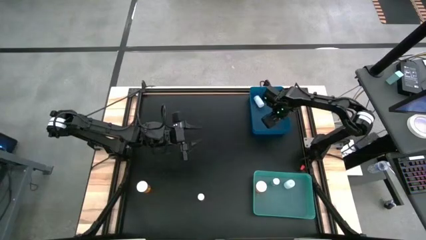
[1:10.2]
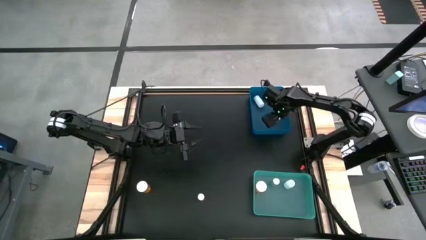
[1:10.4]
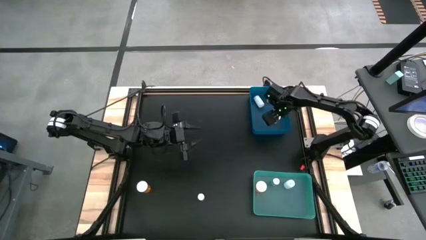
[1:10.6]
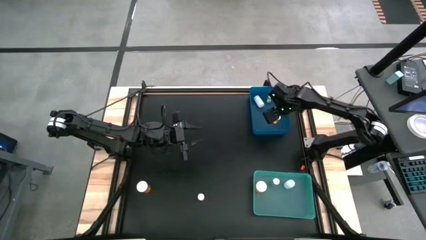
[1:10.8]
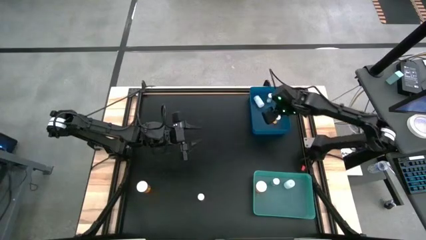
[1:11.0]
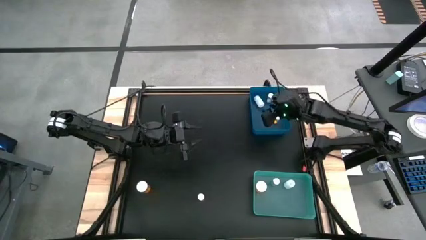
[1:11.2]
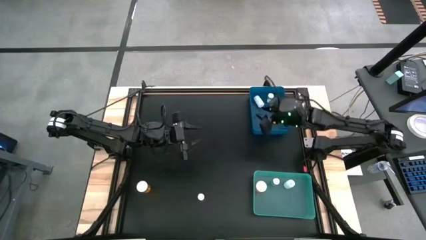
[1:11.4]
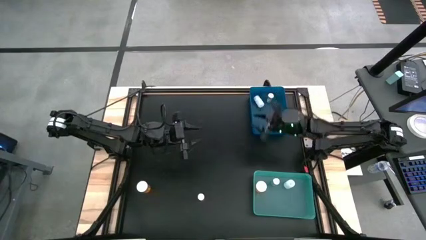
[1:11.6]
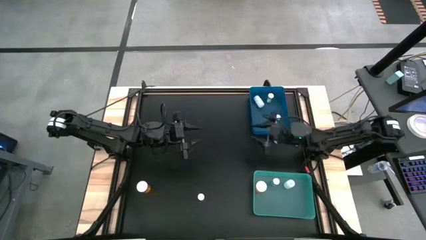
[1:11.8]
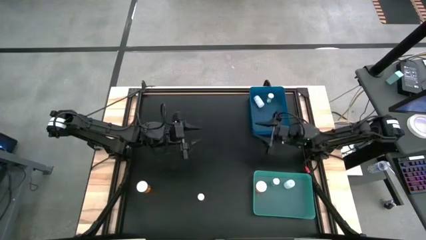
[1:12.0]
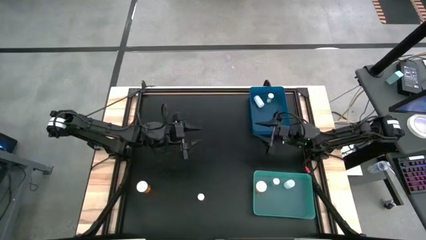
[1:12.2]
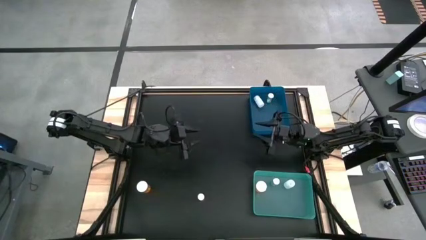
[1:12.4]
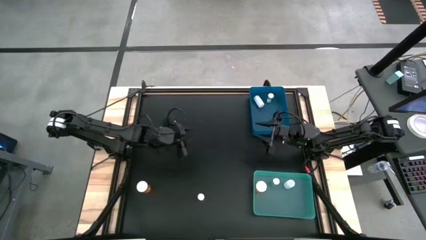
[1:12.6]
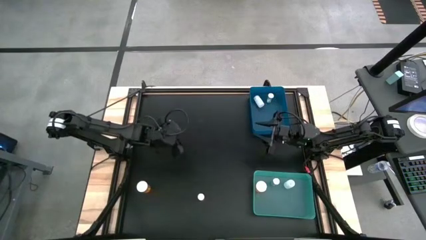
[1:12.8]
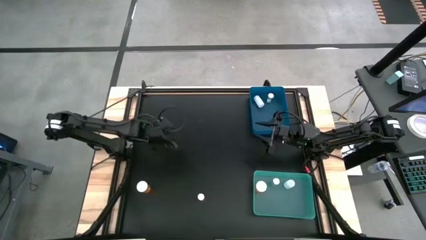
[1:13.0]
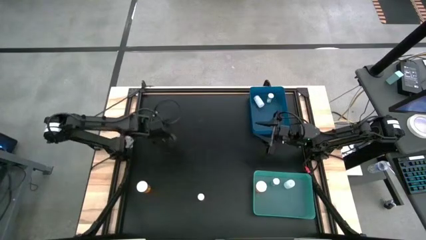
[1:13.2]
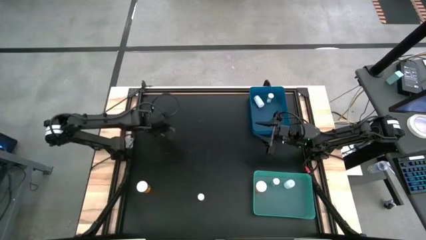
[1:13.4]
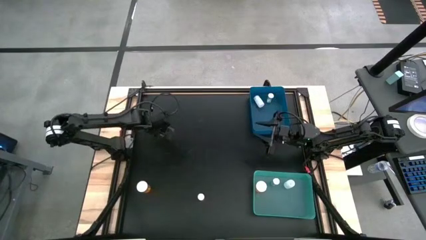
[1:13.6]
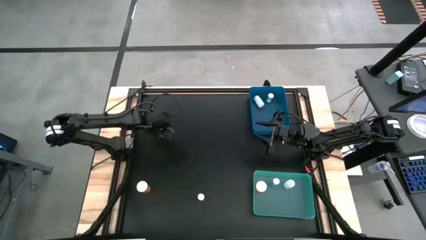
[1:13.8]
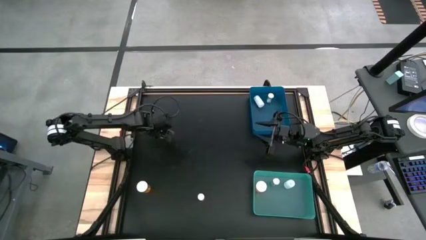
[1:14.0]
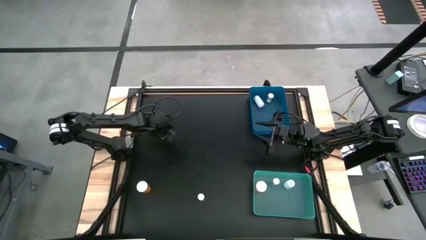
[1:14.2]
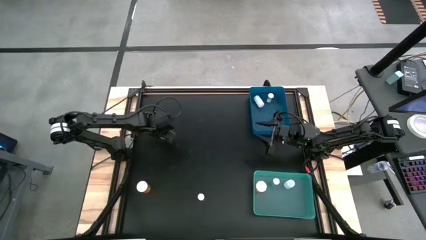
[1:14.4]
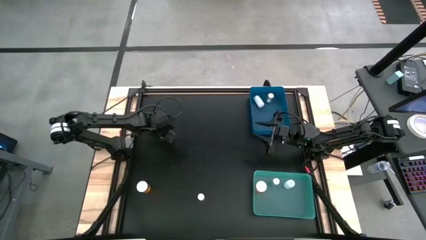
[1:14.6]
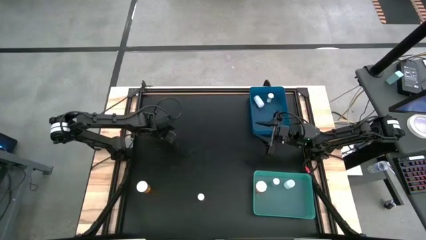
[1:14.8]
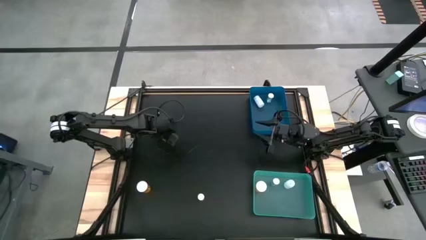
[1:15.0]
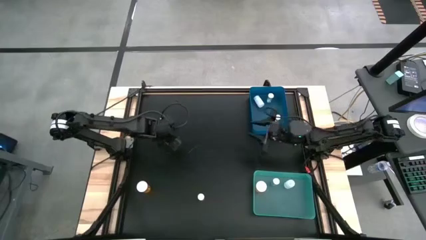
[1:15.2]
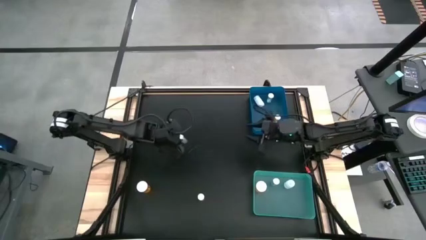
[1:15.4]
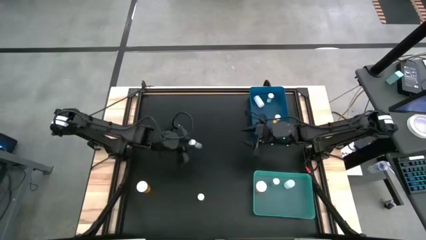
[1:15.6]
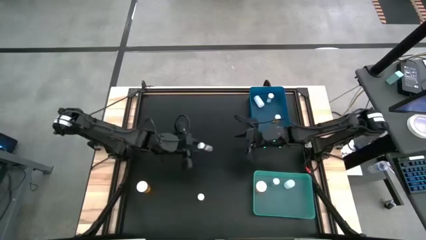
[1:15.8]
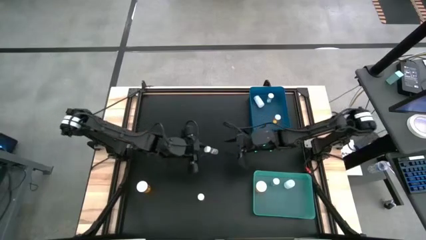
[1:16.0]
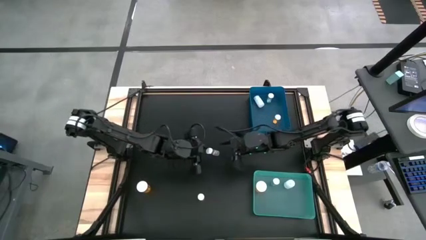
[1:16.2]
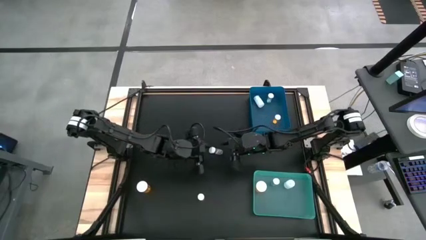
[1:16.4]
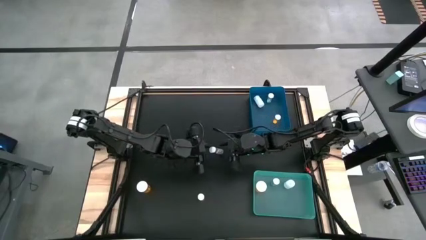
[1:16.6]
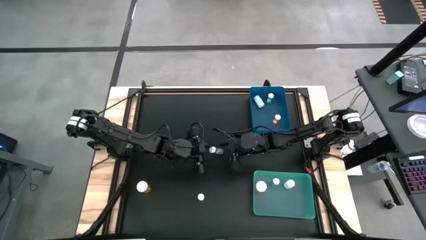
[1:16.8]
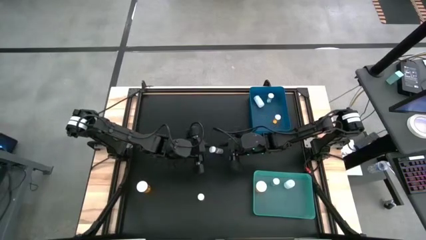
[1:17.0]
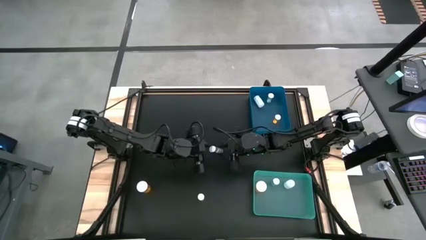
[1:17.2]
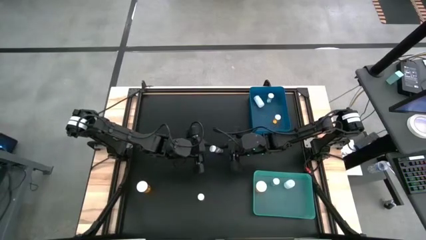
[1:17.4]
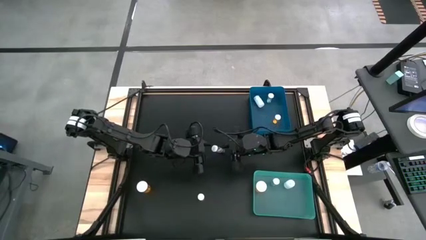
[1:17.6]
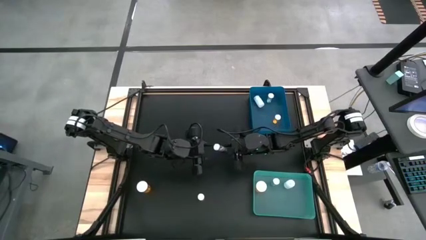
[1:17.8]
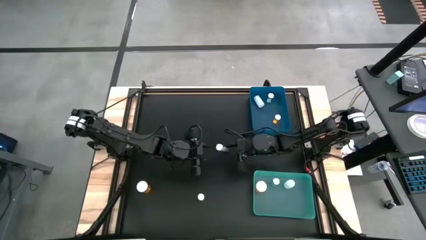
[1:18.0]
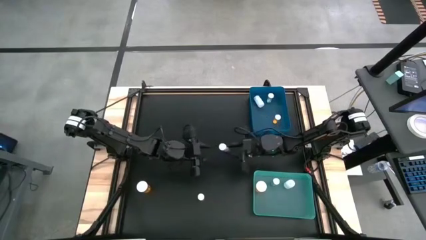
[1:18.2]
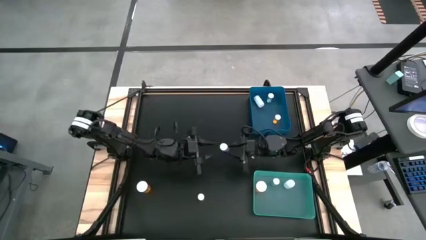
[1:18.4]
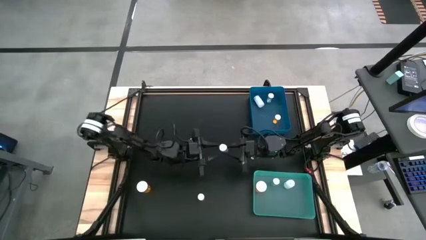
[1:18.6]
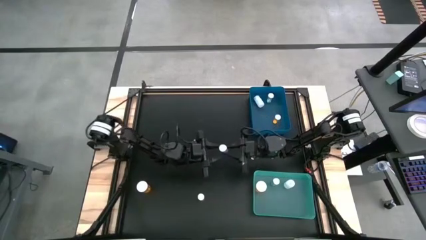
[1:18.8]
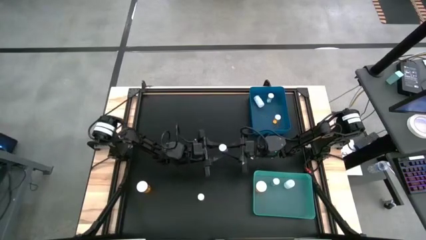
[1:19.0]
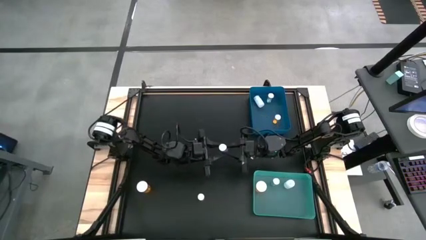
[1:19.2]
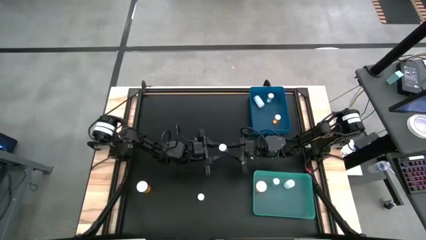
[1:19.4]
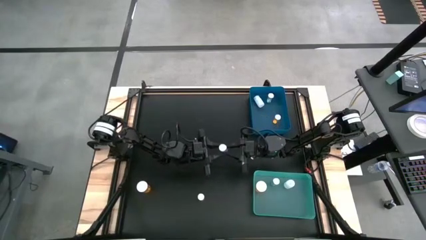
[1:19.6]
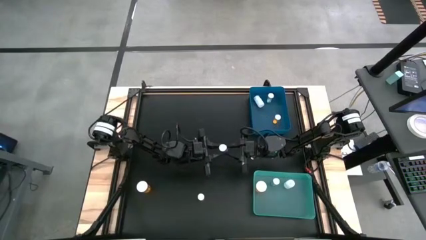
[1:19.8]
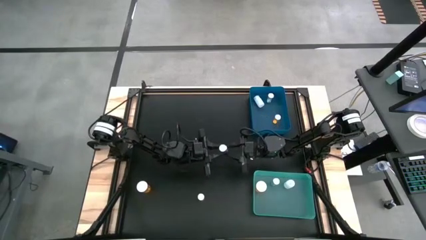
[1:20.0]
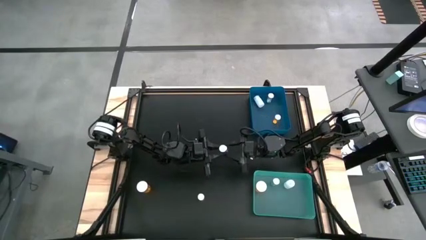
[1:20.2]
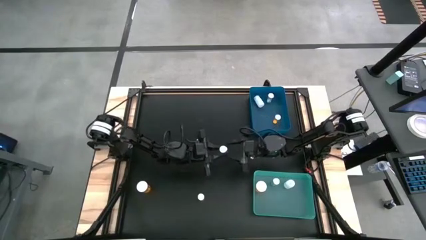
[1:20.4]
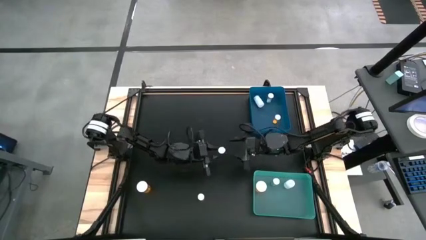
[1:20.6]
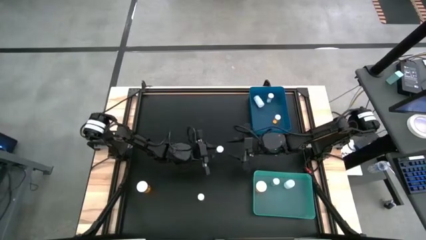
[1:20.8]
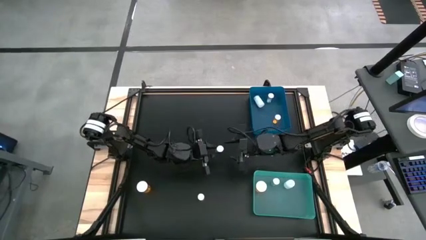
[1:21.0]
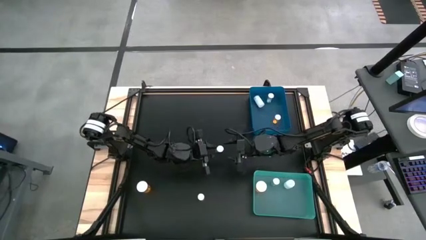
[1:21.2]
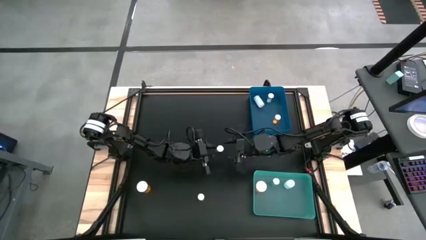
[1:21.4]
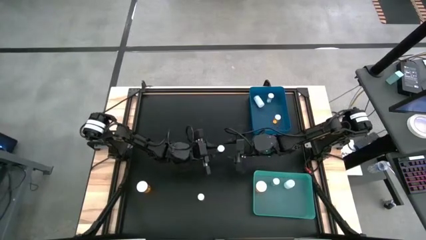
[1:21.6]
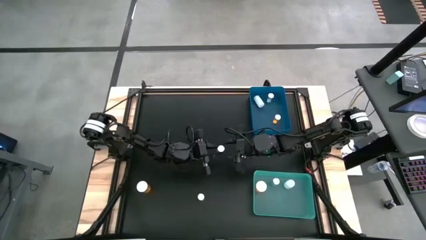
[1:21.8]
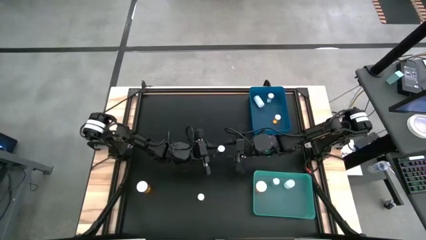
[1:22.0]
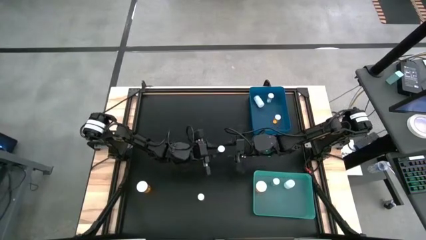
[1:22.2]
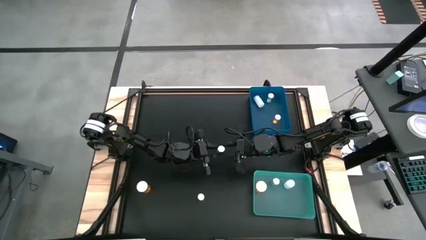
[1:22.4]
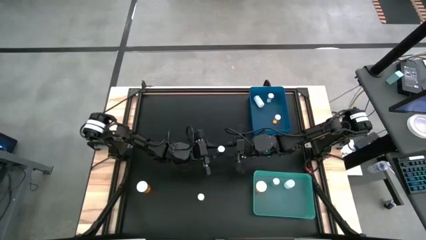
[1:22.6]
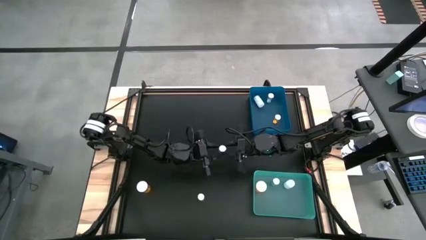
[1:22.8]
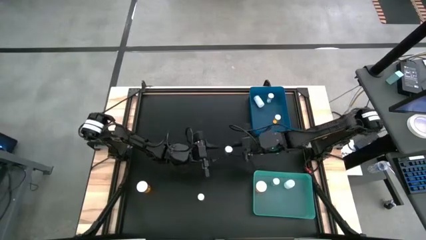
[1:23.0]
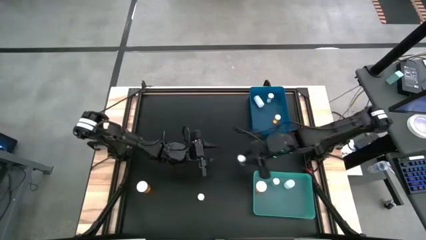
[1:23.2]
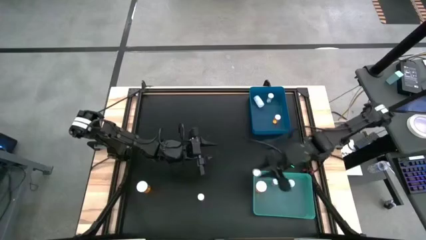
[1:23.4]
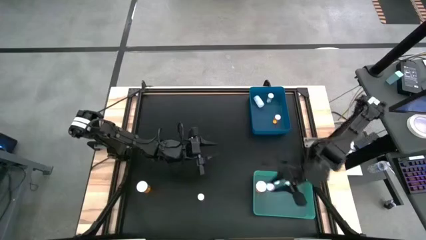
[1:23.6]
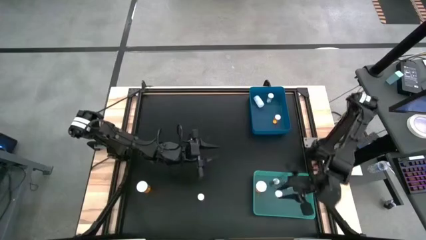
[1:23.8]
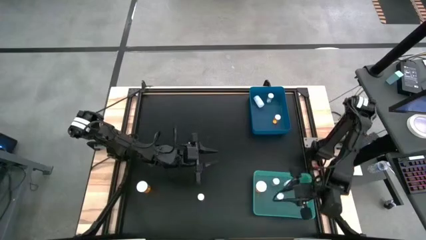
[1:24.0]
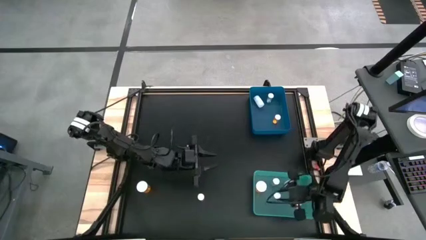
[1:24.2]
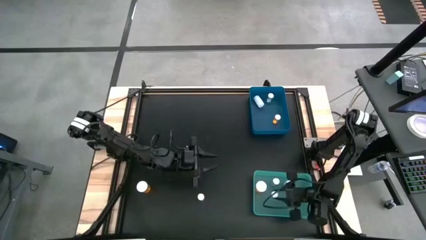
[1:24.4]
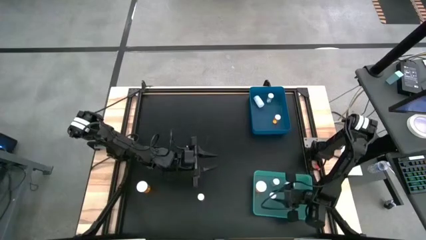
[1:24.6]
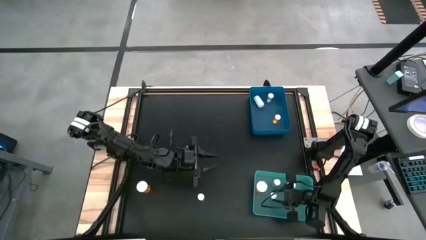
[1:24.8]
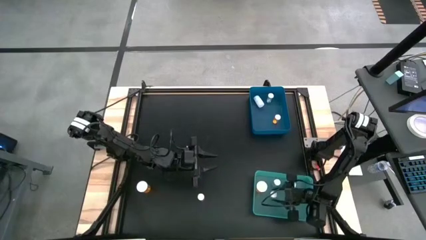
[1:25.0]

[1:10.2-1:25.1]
Task: Pick and place medicine bottles into bin by pill shape (circle, oval)
Put the light green pill bottle into the light green bin

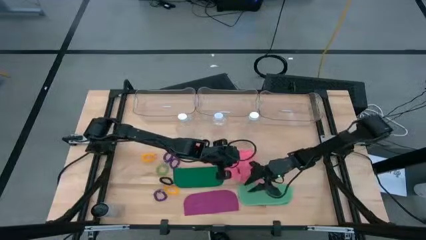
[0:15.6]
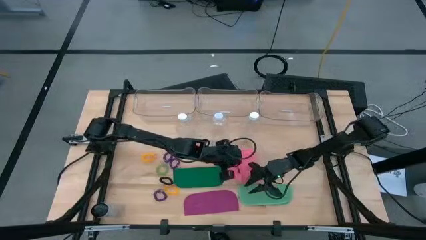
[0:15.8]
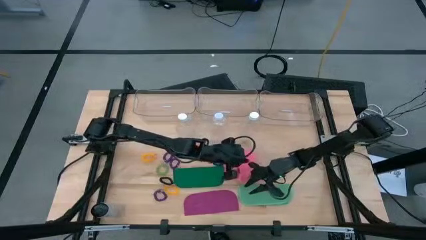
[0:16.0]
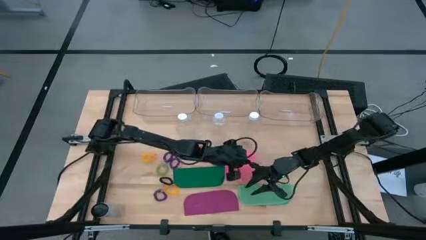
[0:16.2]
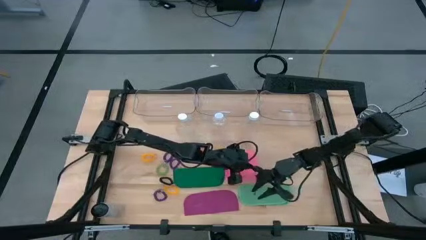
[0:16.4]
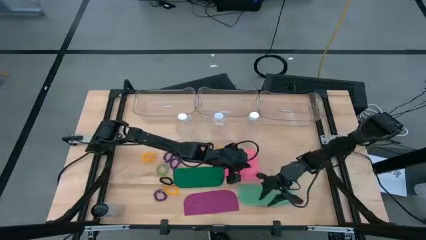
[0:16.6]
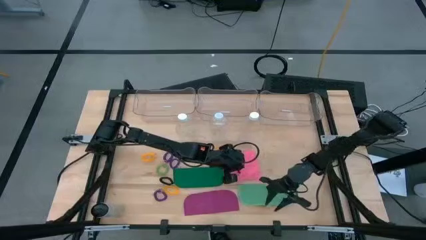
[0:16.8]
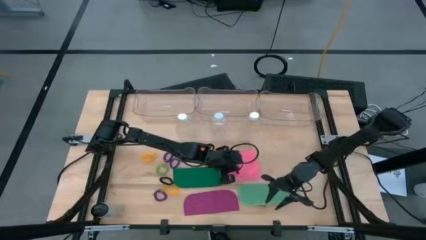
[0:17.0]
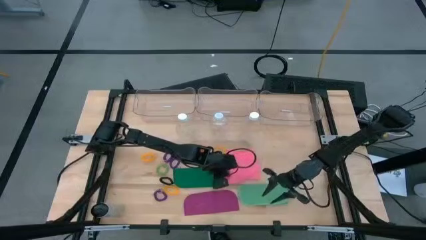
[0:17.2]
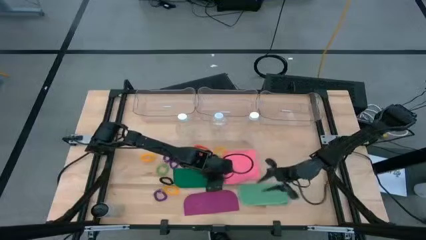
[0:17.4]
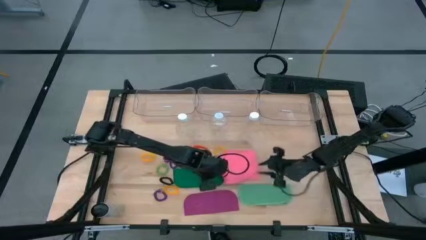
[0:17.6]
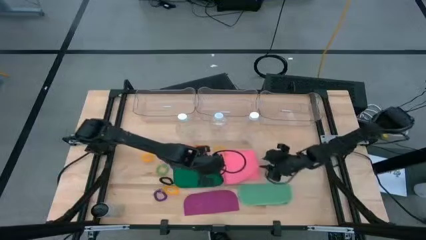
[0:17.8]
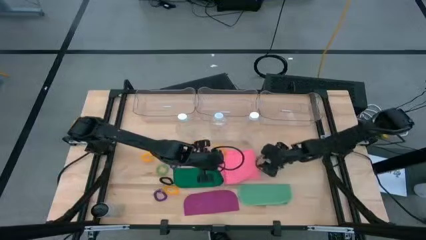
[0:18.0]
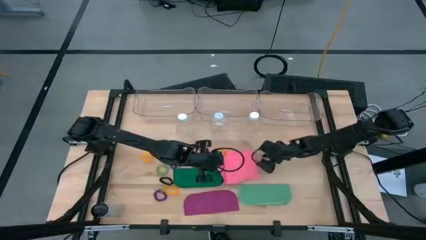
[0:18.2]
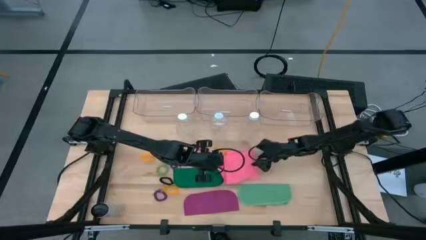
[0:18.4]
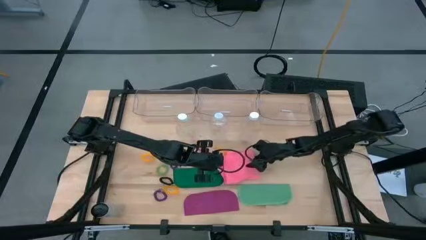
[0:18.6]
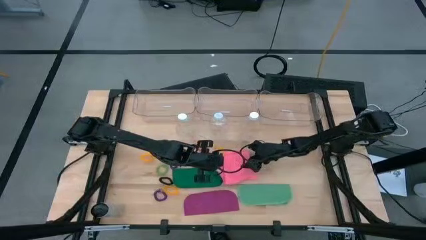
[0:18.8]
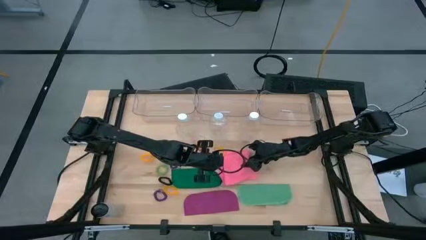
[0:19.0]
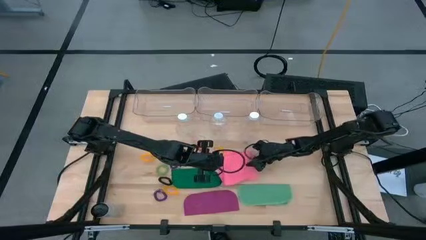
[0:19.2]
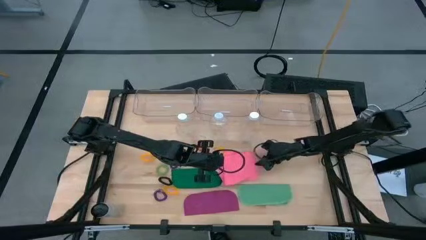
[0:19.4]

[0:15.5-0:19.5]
Task: Pick & Place Sports Items
Put the pink microfiber towel into the right transparent bin
